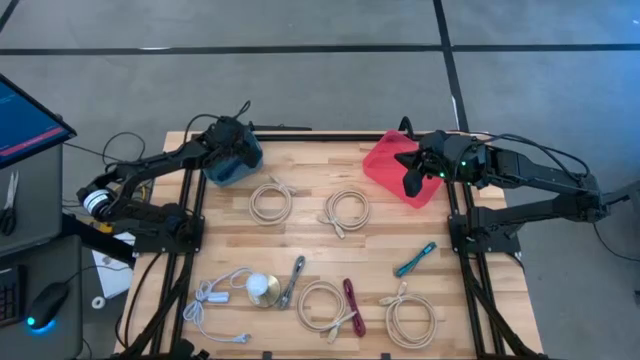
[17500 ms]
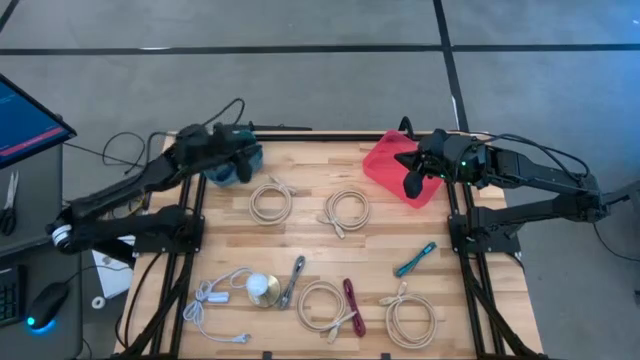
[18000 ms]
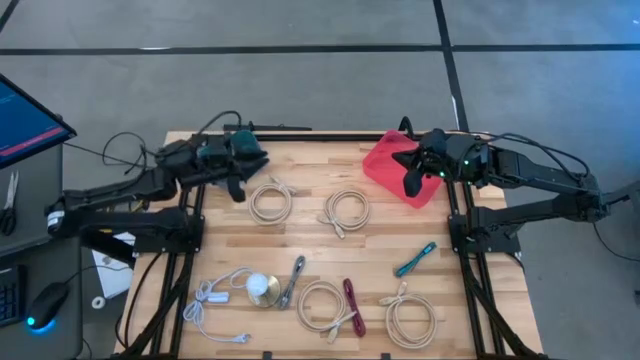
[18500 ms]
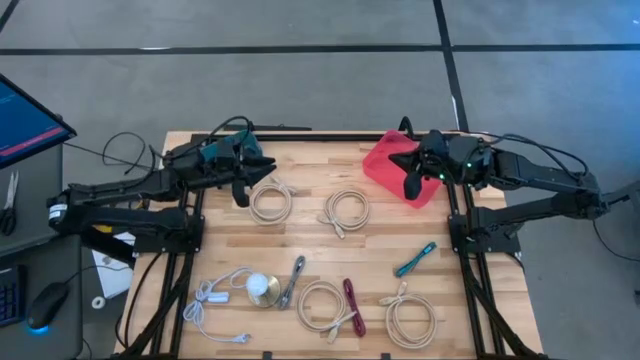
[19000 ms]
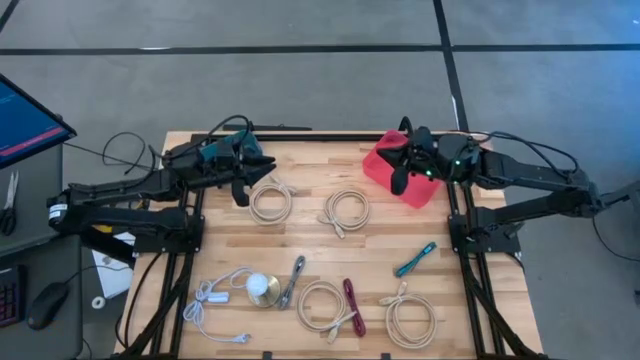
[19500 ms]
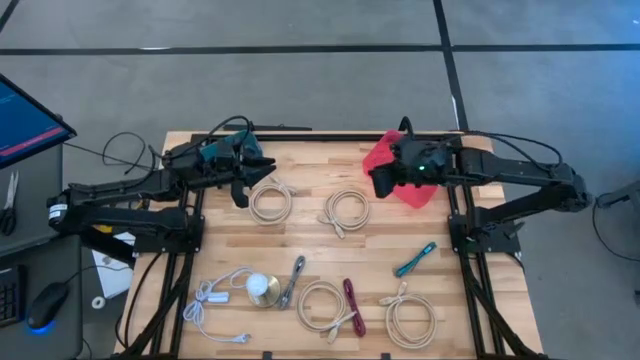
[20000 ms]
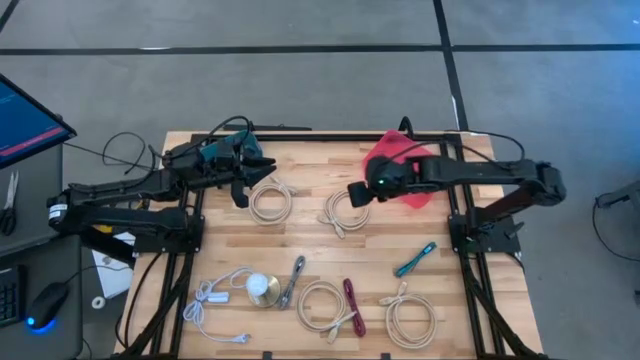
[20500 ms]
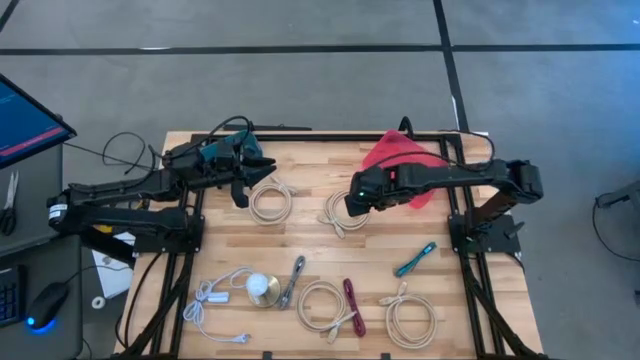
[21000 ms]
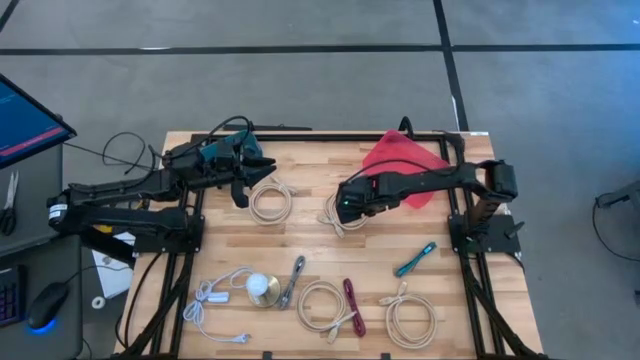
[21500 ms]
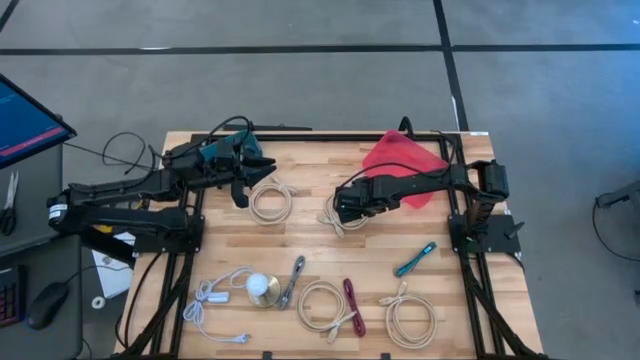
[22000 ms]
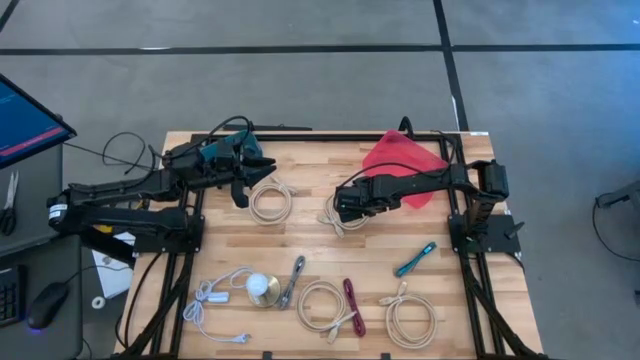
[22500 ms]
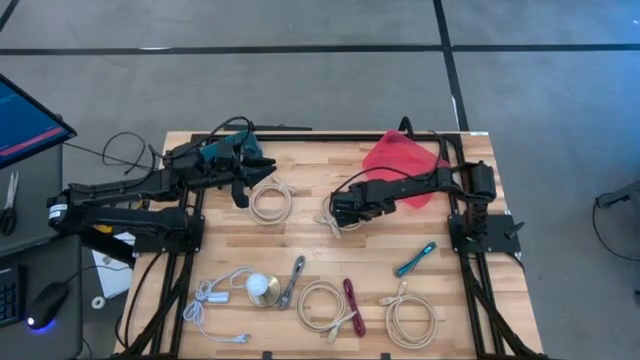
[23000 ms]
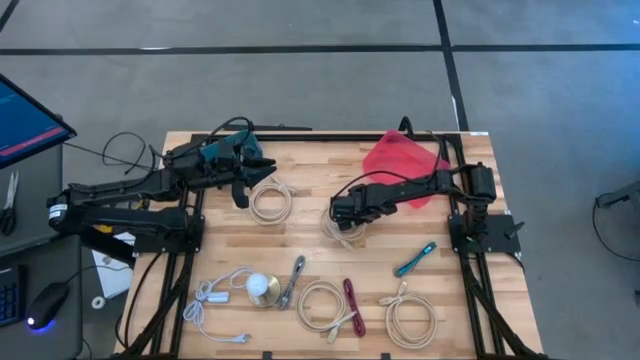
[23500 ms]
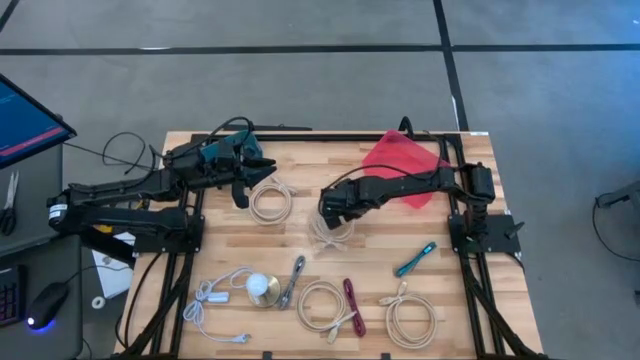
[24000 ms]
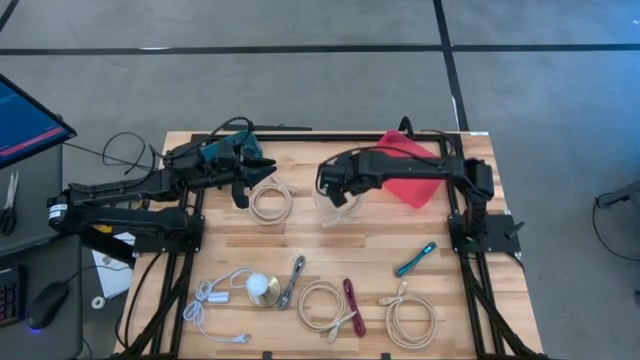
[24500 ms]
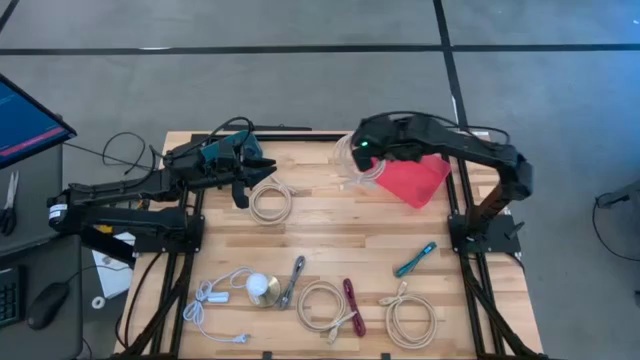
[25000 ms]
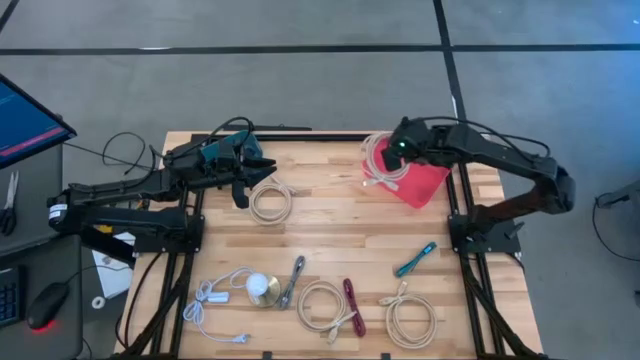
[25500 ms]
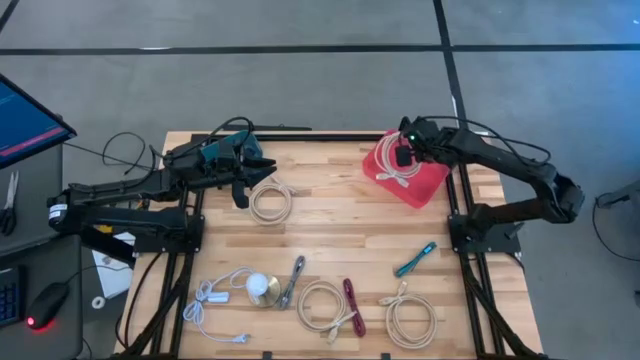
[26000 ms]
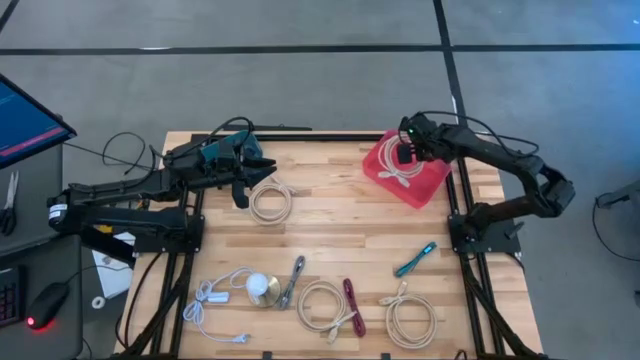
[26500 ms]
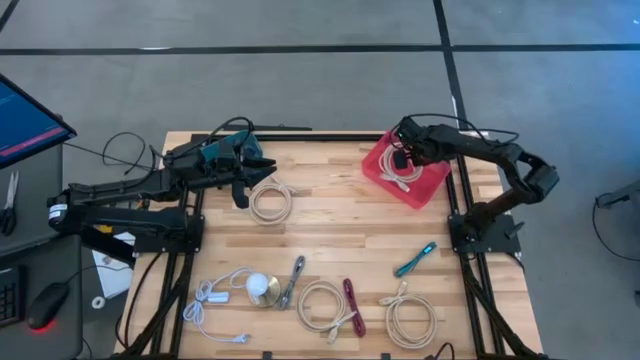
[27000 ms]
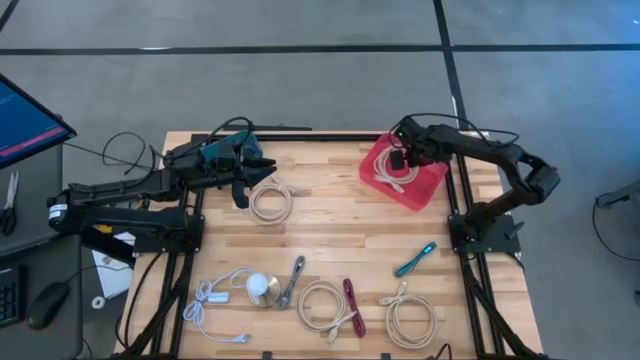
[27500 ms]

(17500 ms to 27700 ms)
Task: Pick & Place USB Port
Put the white charger cable into pink bin

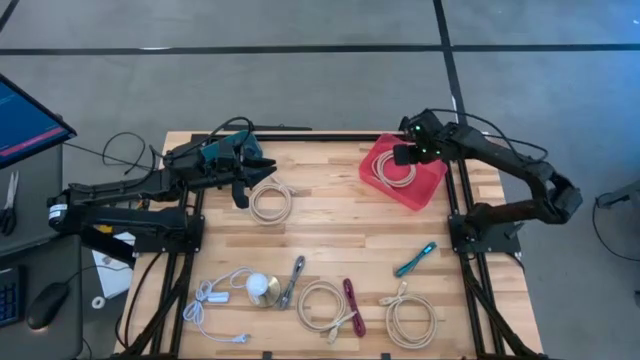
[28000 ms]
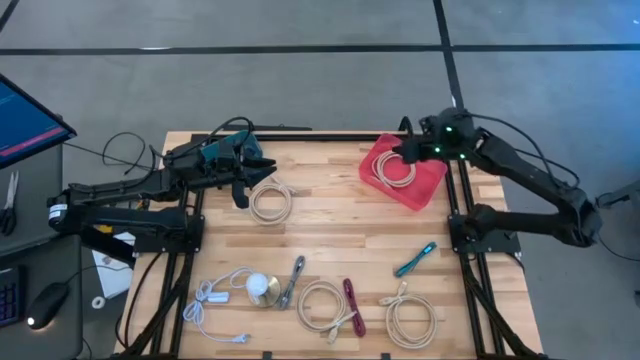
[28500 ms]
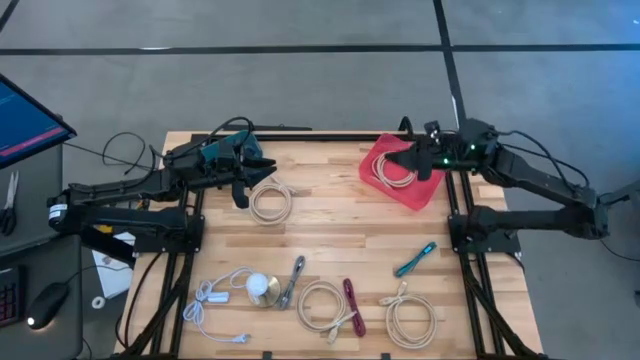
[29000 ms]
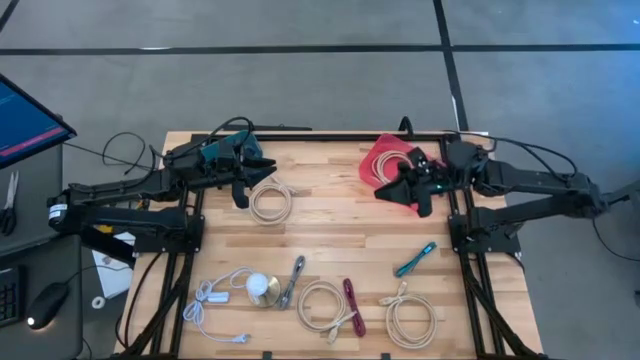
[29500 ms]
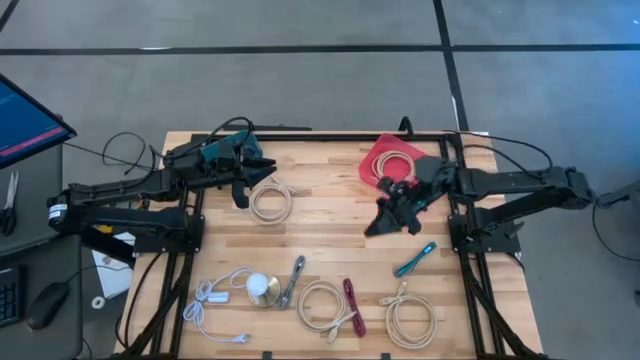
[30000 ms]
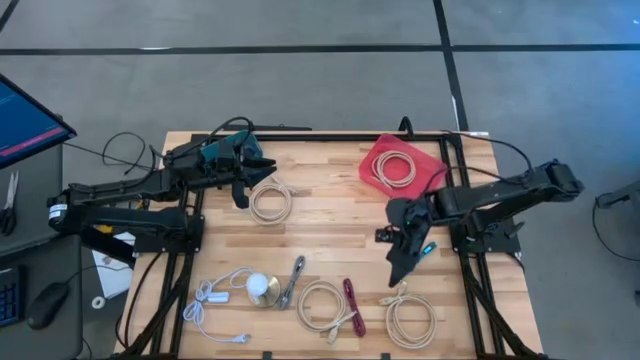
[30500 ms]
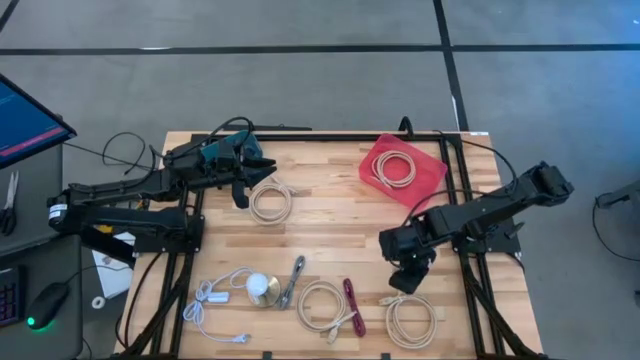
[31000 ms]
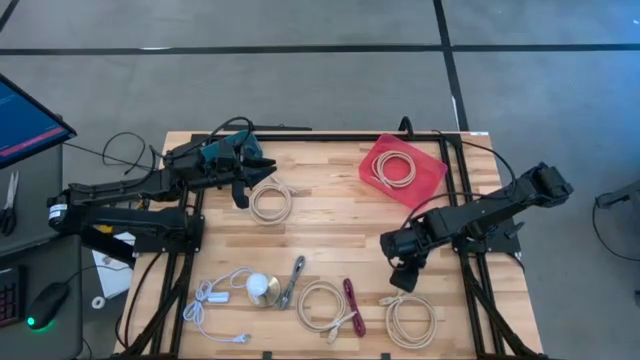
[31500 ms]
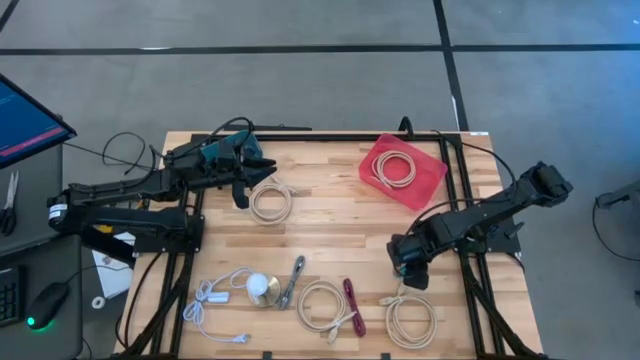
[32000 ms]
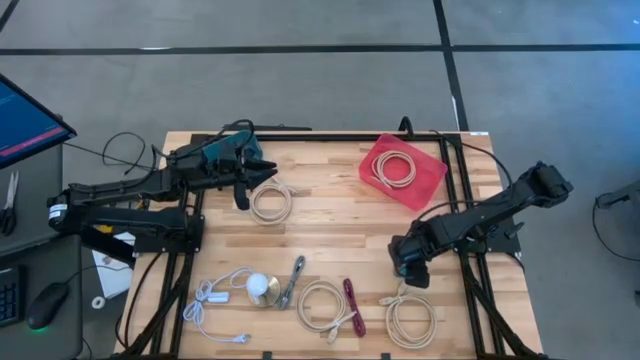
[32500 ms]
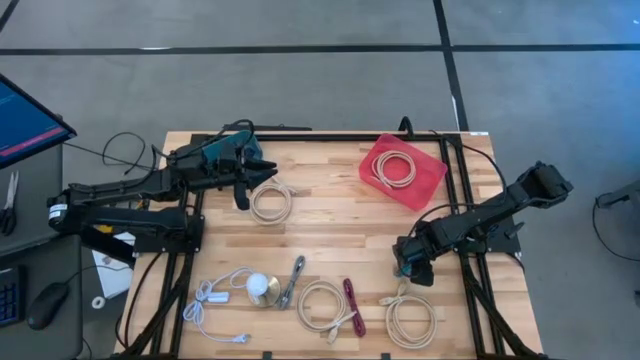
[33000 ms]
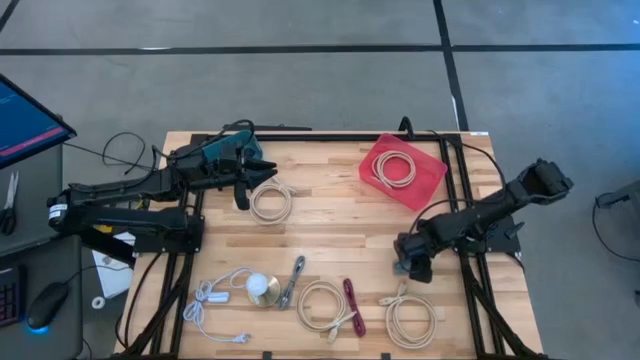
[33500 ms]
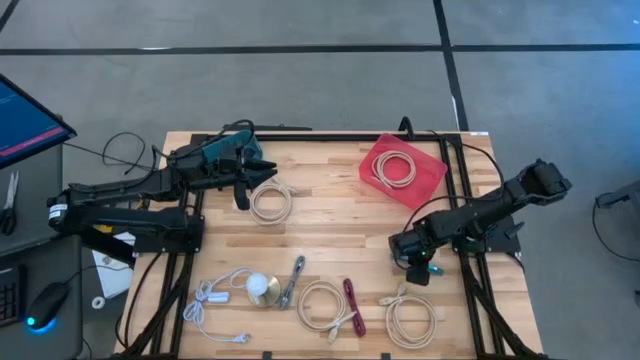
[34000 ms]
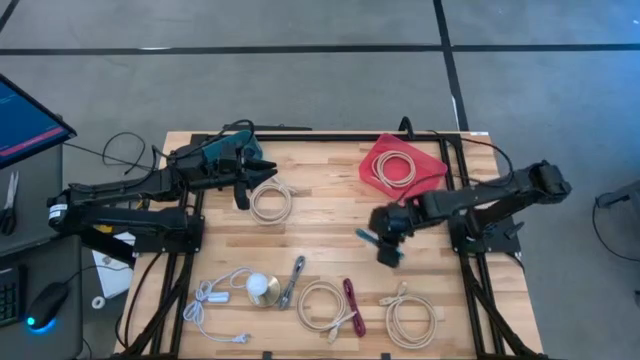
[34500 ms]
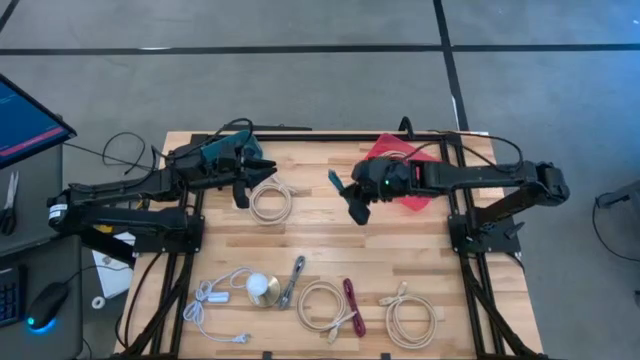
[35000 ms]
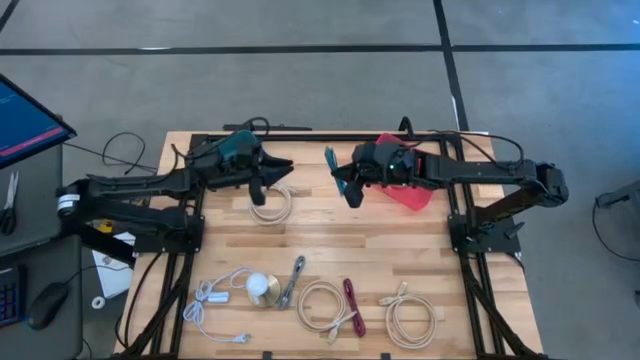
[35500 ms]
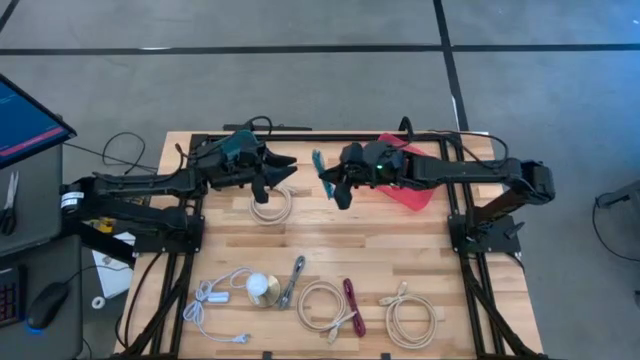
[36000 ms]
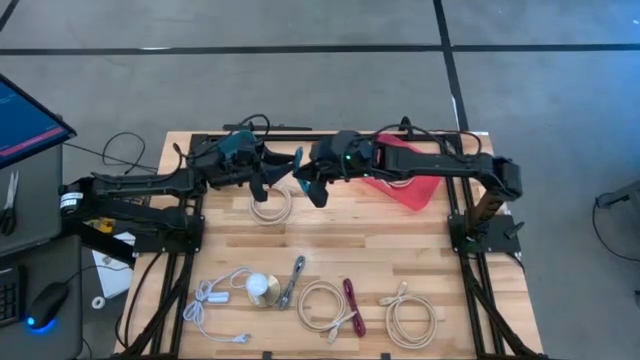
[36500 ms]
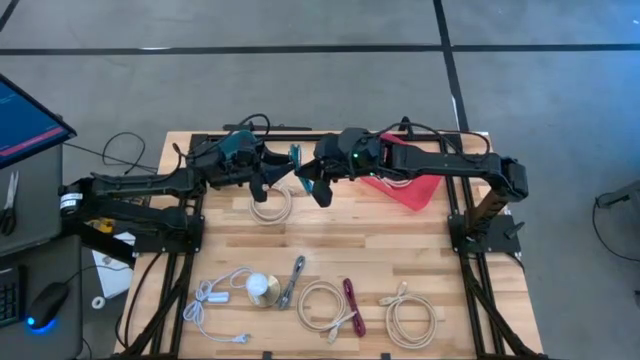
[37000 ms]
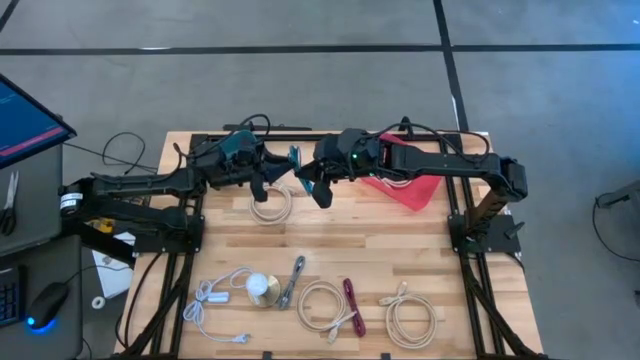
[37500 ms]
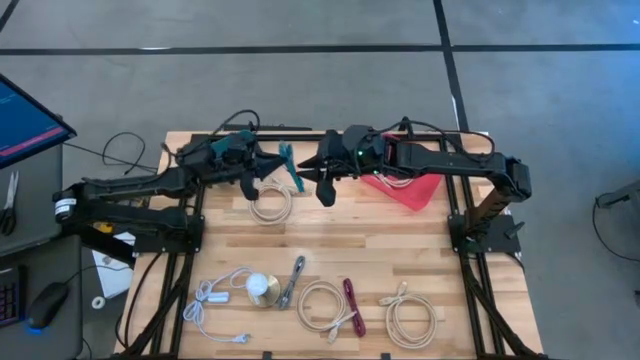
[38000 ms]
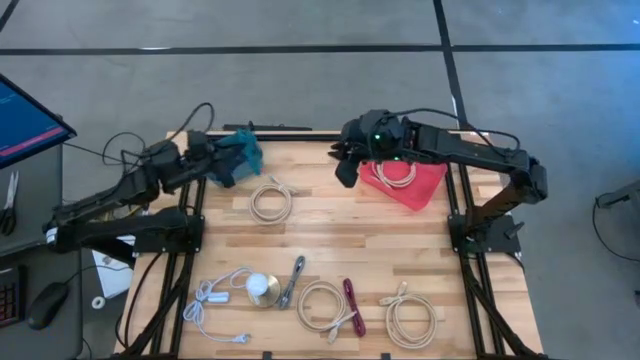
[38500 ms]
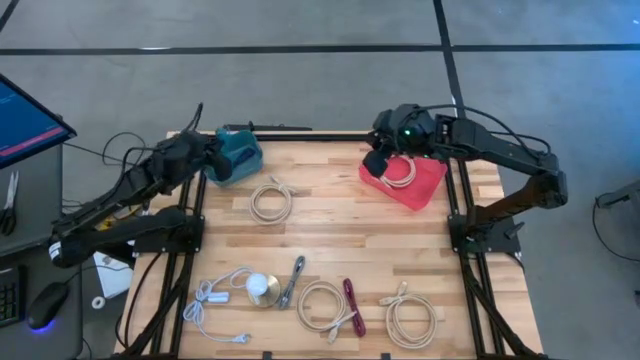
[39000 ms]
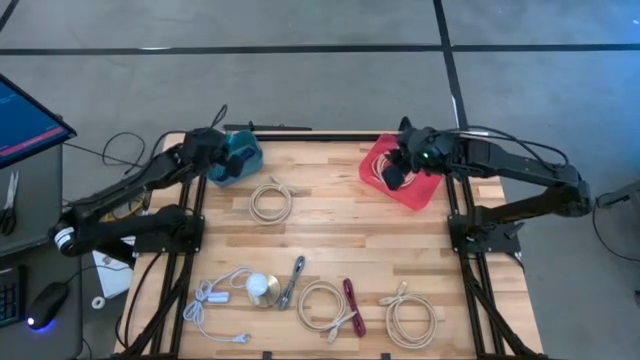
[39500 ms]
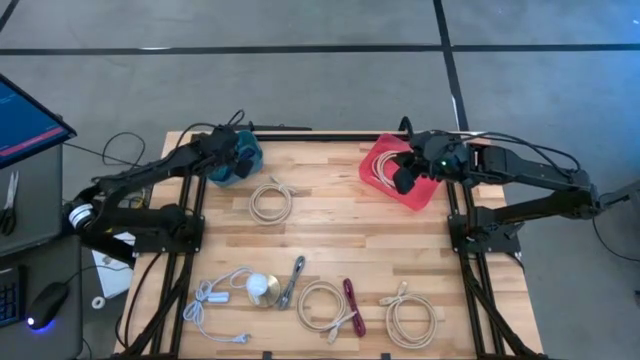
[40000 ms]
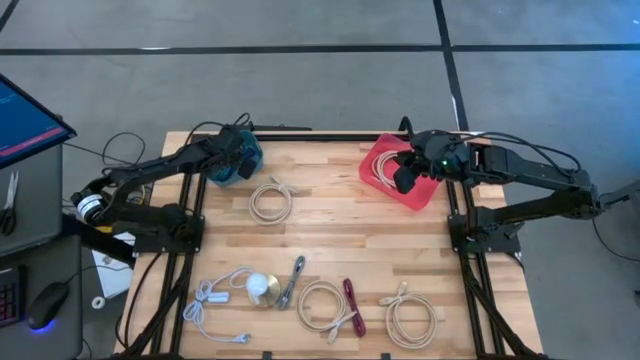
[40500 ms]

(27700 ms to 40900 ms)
Put the blue black charger cable into blue bin
